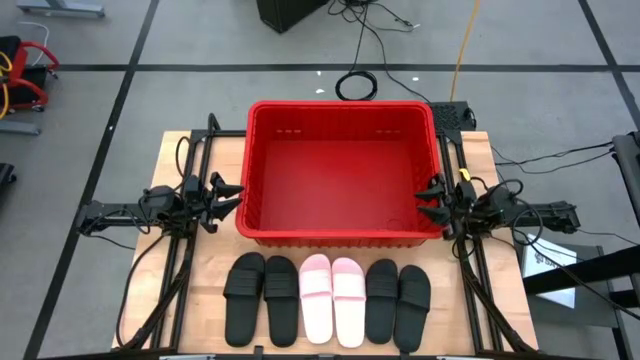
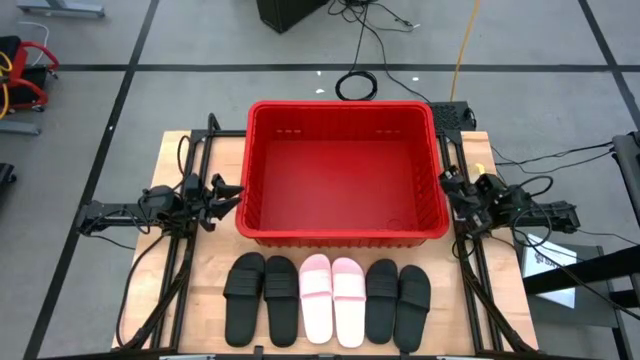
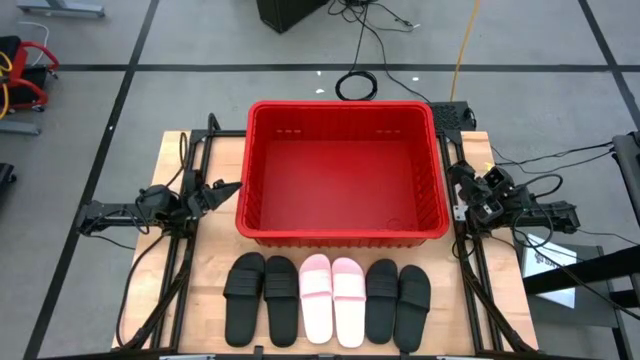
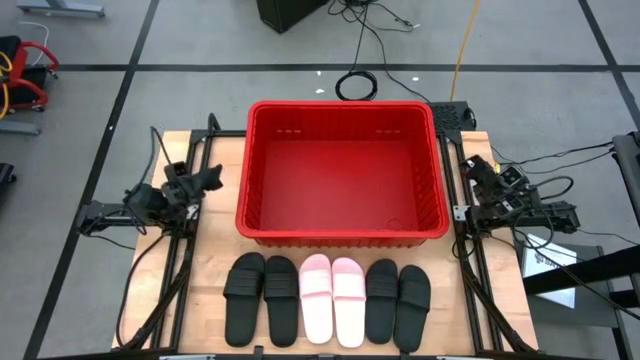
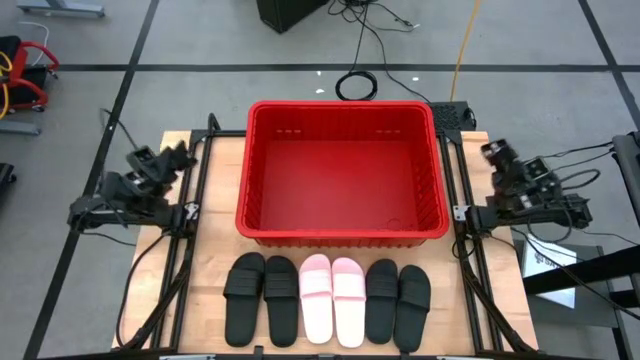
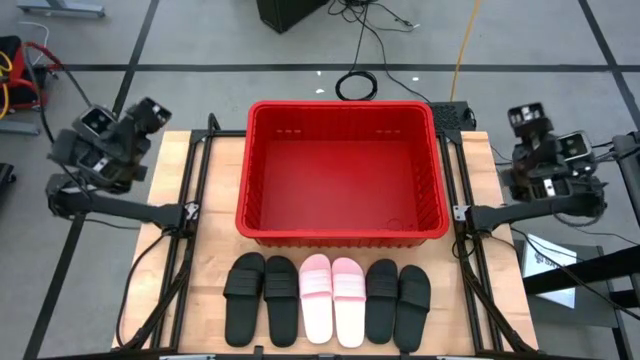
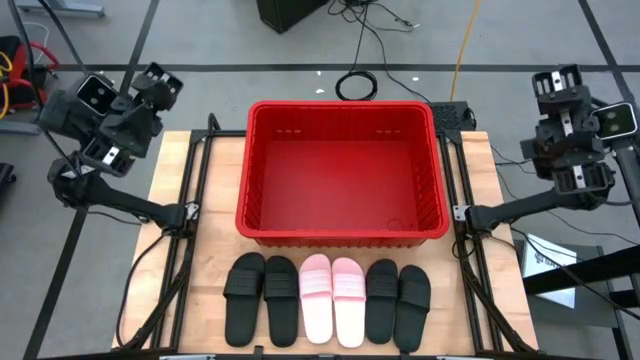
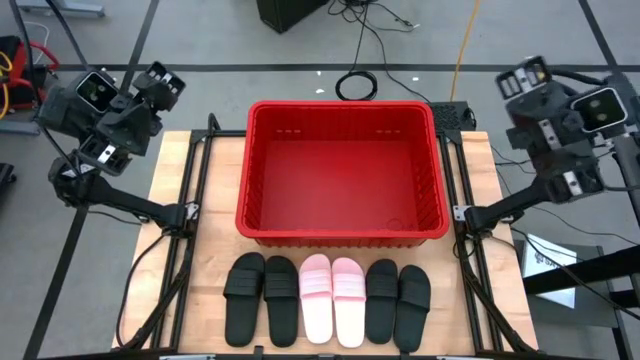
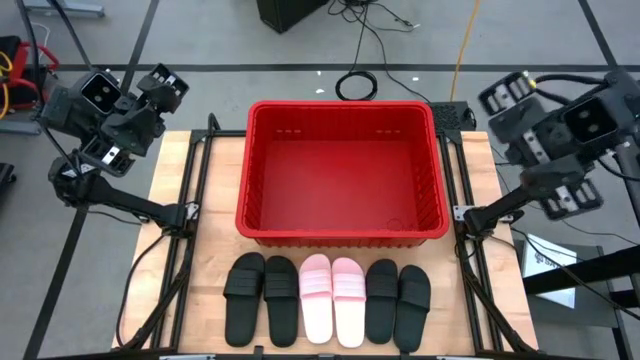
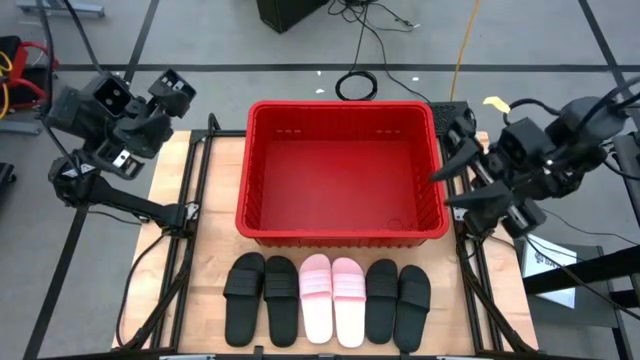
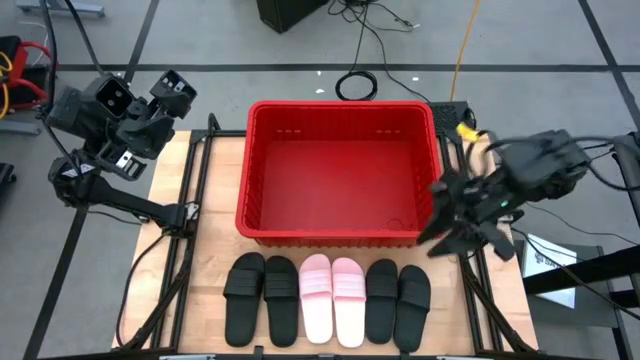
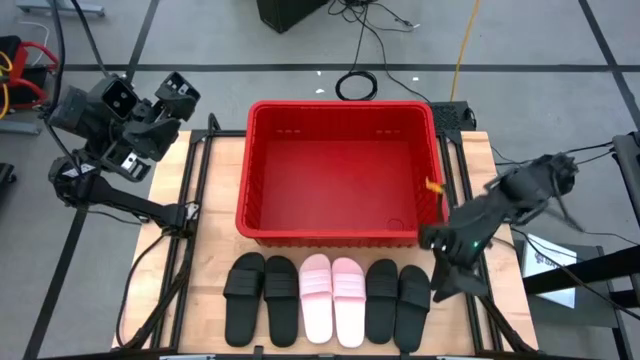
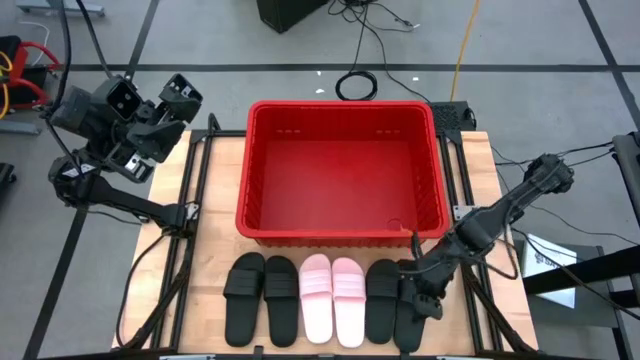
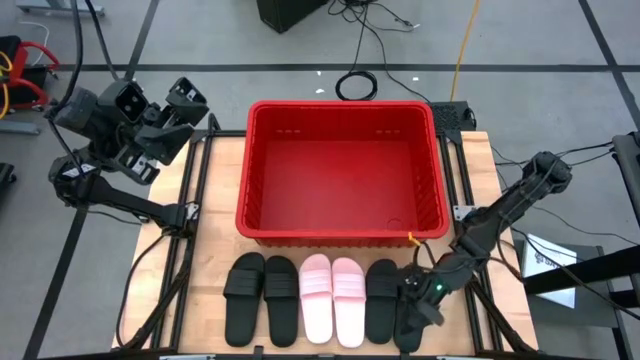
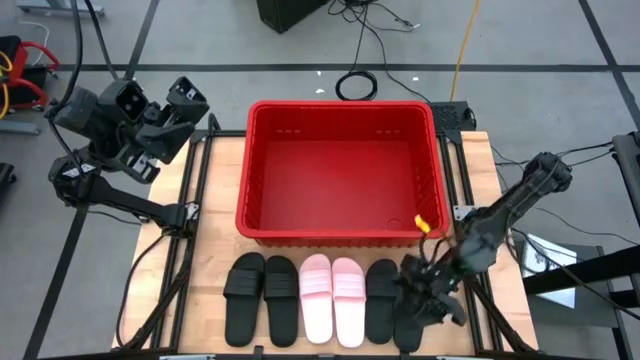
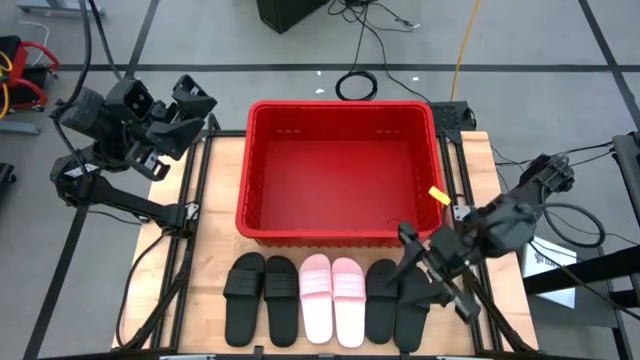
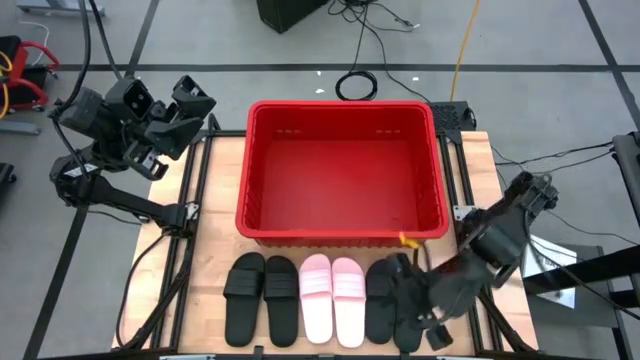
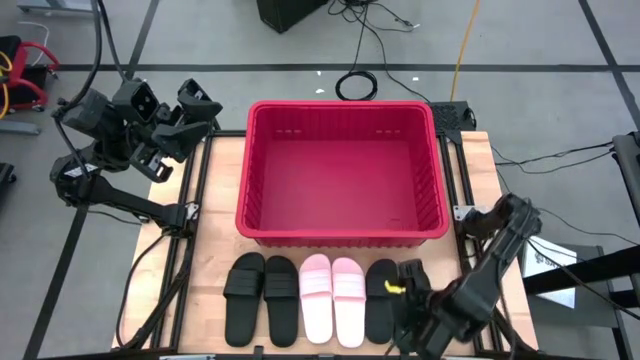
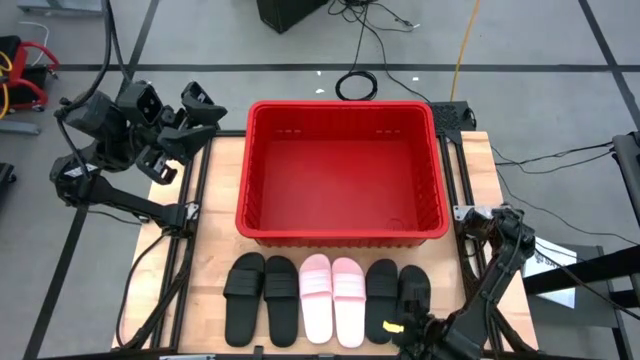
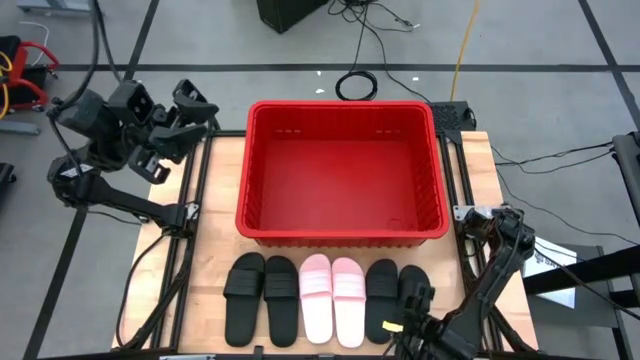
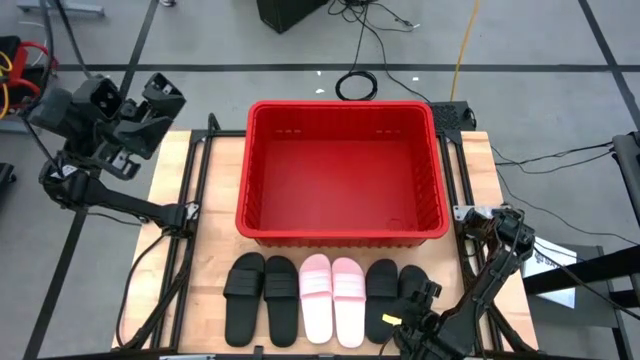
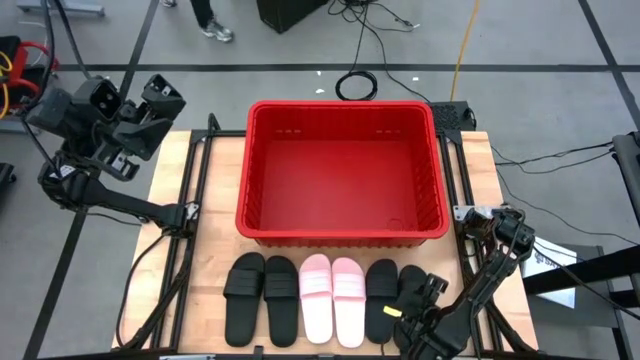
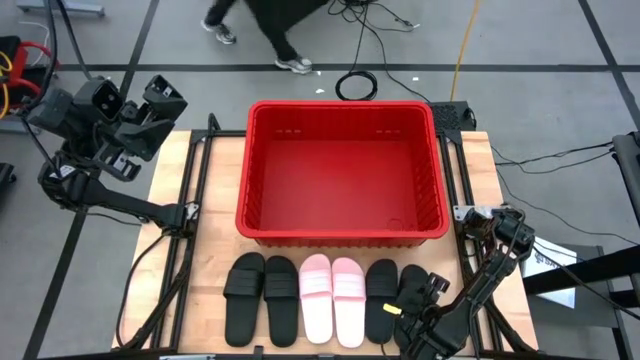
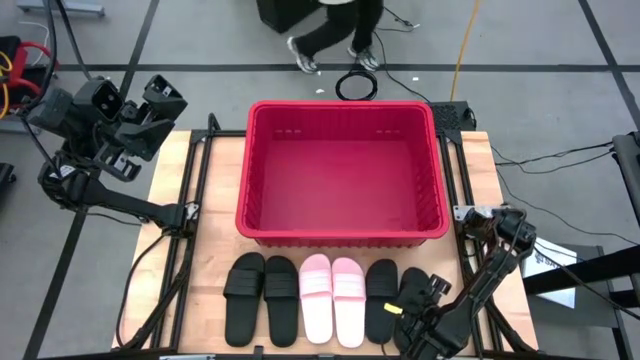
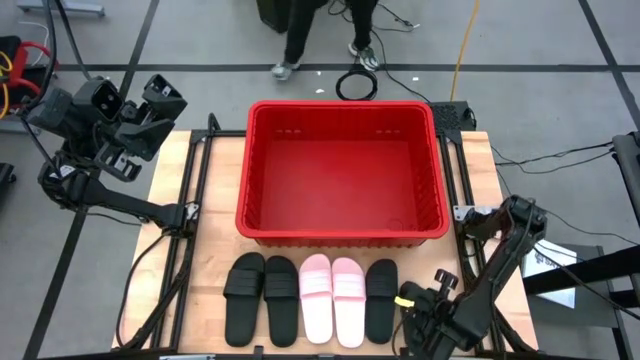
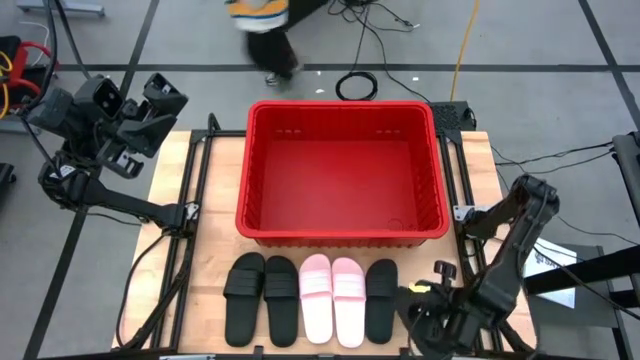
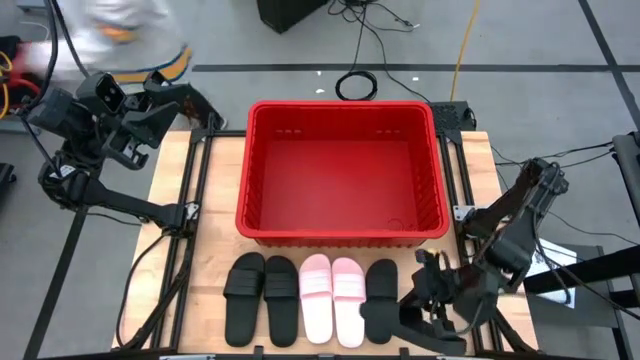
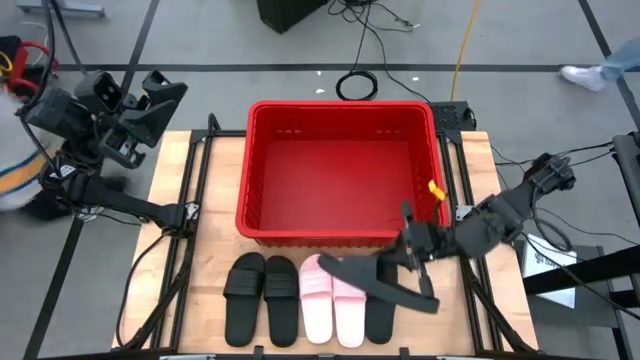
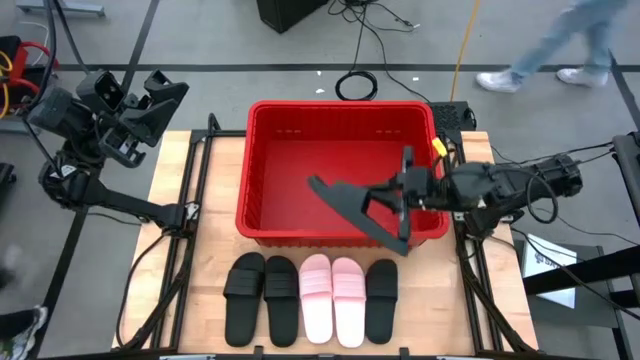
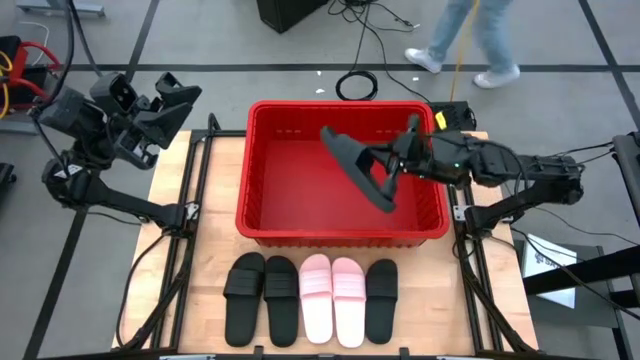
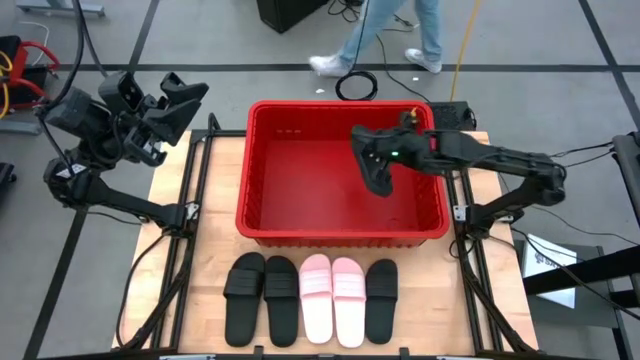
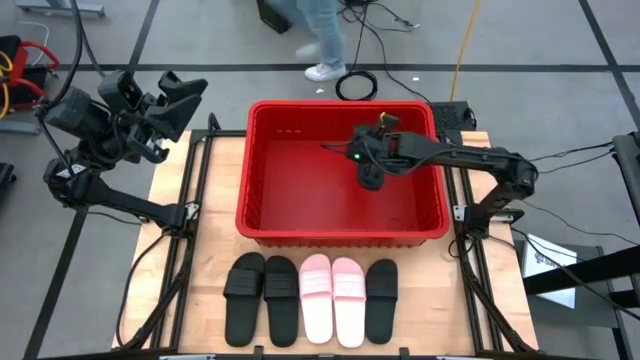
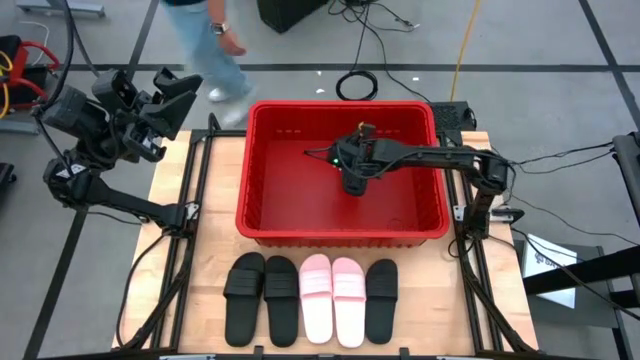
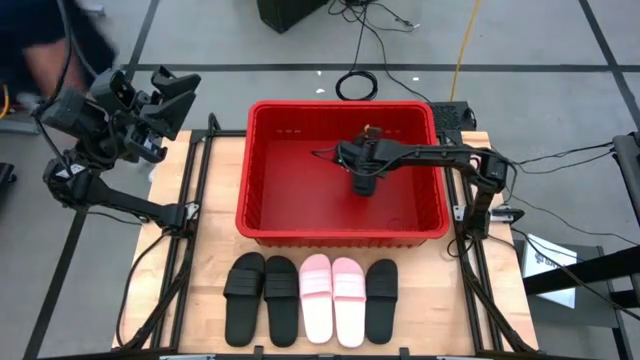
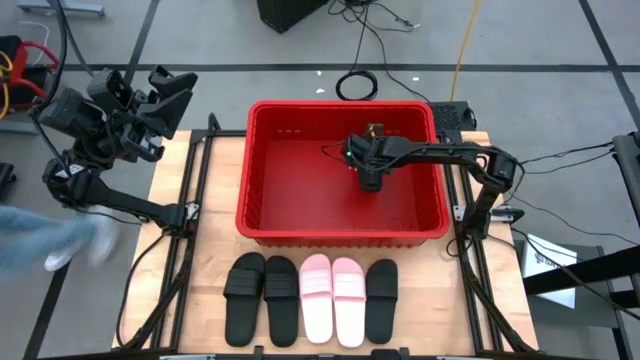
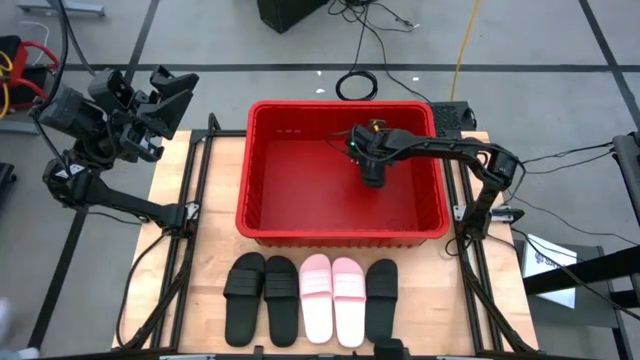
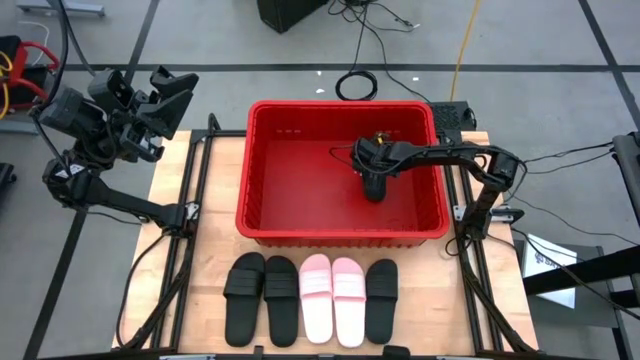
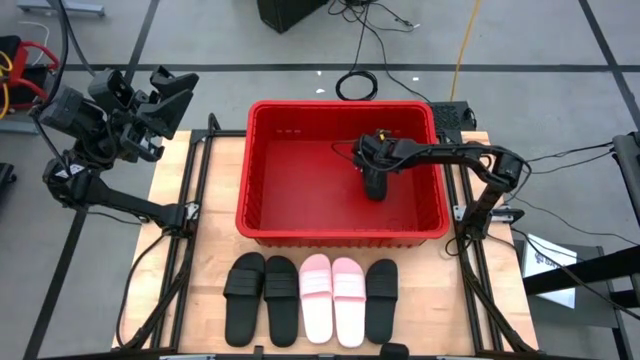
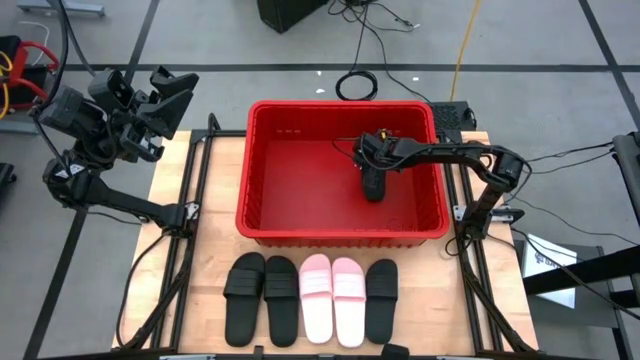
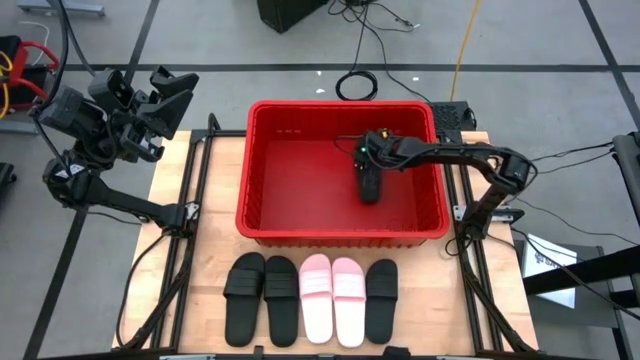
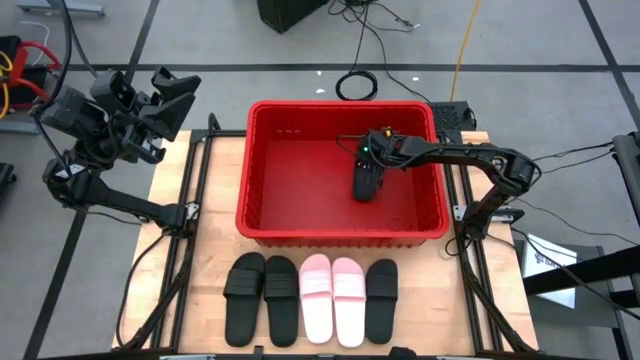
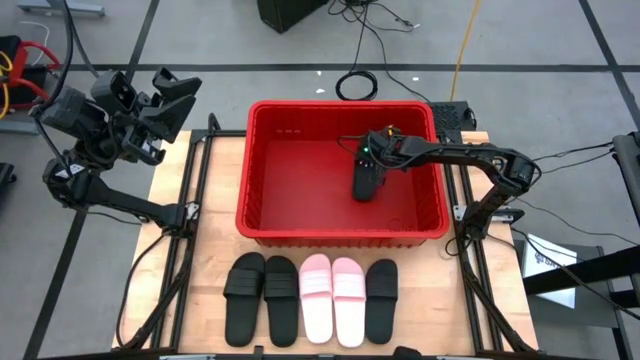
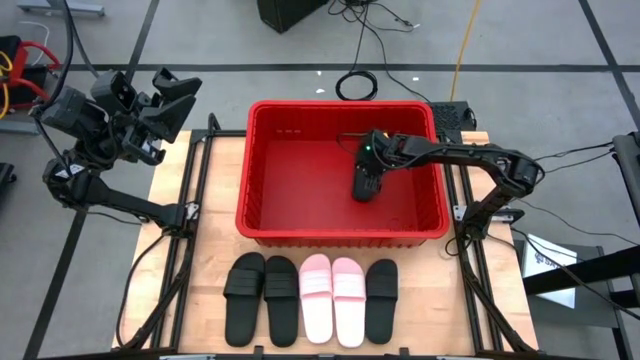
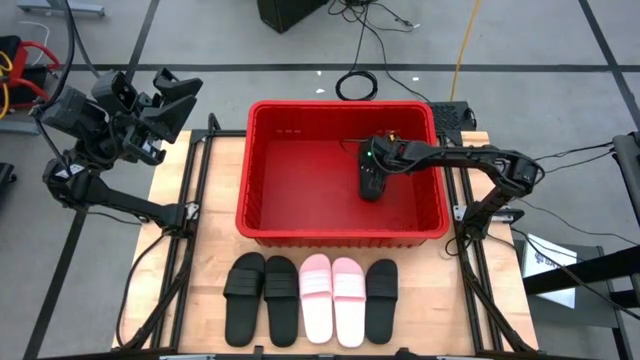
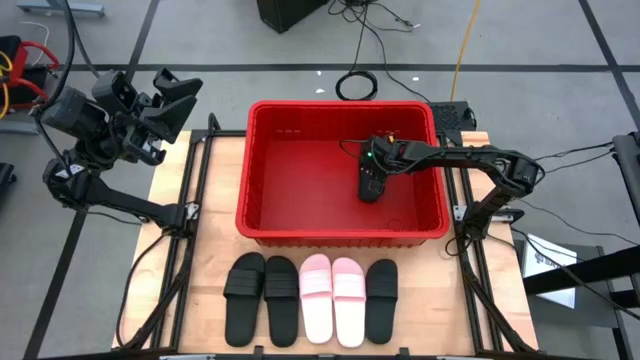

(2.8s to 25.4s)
Task: Pick and place slides into bin
Put the black slide into the red bin
